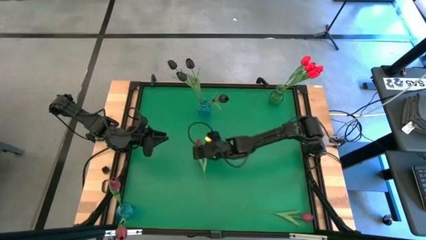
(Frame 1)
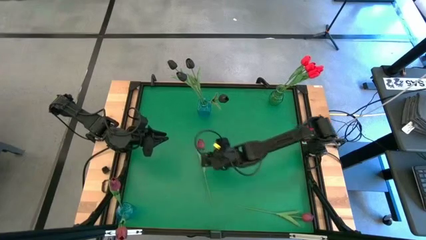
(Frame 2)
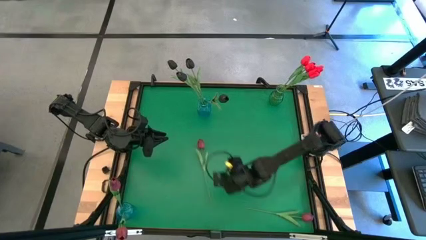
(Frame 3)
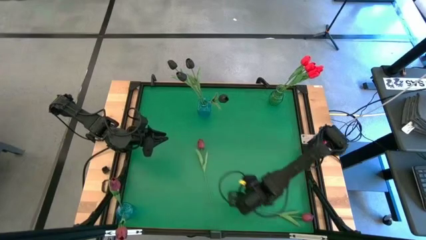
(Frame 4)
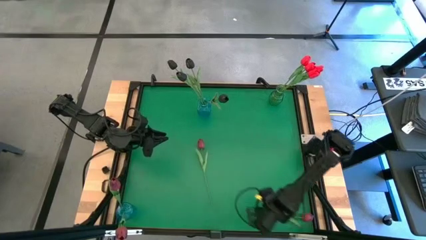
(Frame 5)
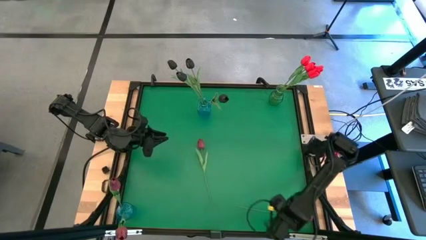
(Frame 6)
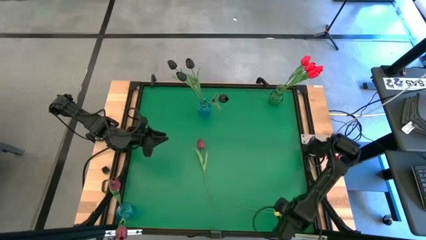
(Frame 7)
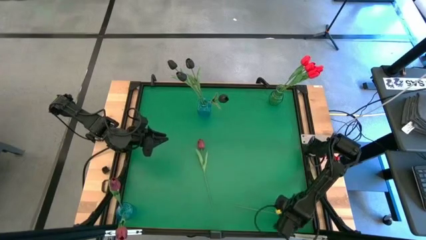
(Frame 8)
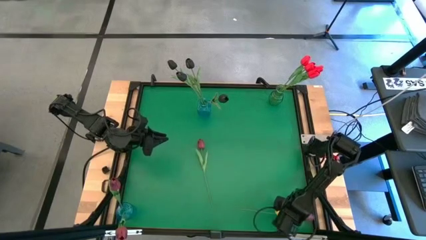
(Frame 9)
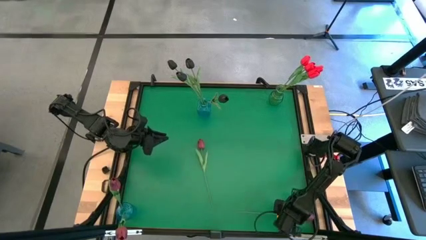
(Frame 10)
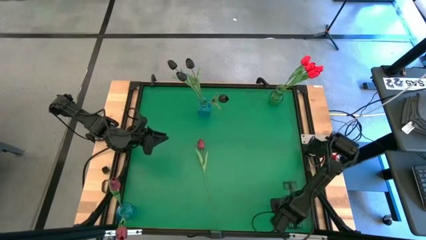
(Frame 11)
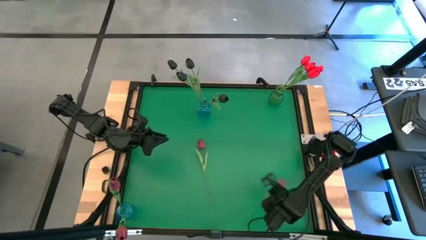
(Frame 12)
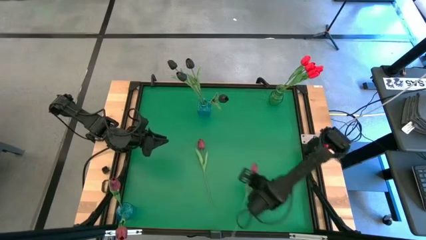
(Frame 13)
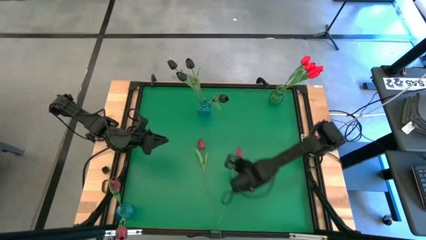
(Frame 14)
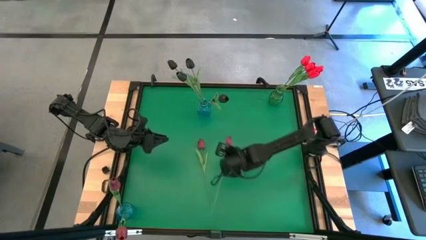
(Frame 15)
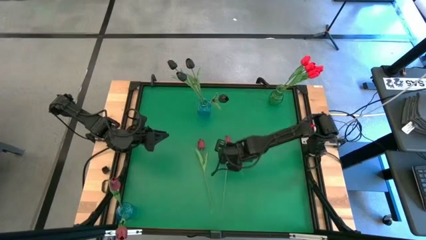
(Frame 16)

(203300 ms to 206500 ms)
Task: Sort flowers into vase by color
Adjust the pink tulip on the center table

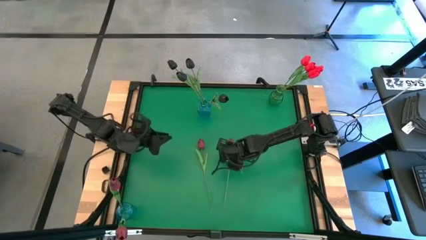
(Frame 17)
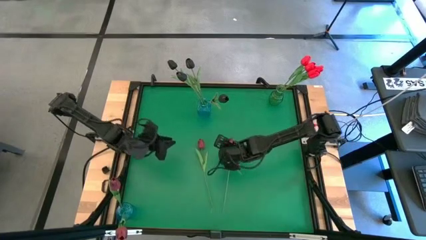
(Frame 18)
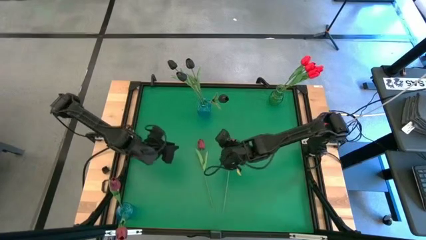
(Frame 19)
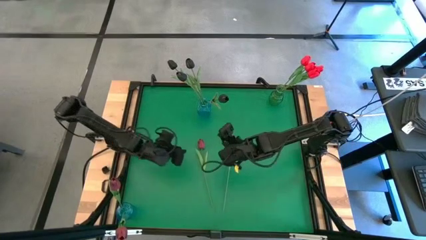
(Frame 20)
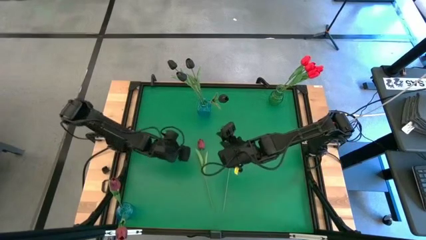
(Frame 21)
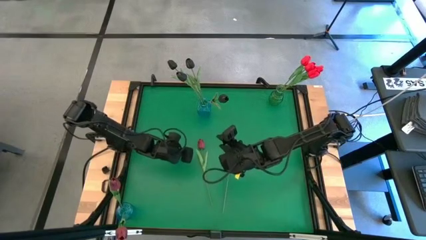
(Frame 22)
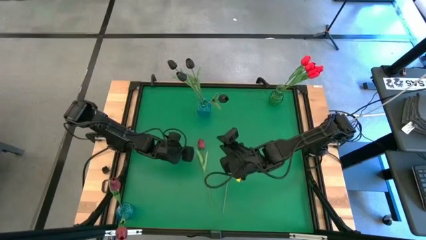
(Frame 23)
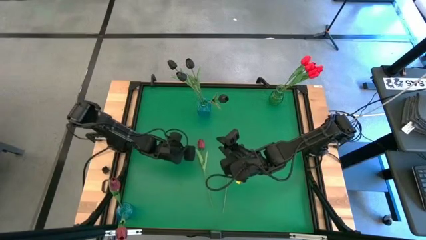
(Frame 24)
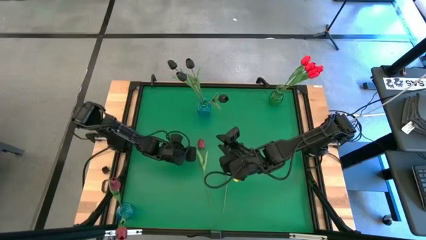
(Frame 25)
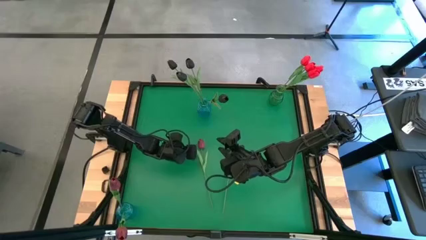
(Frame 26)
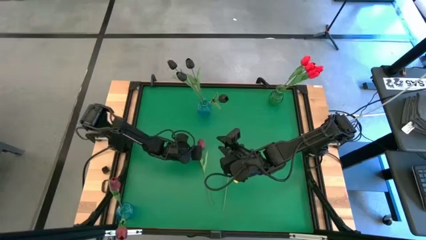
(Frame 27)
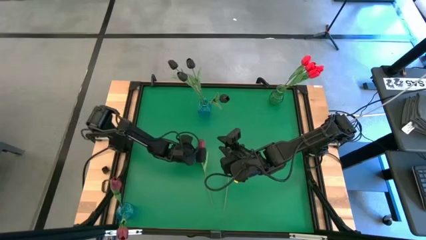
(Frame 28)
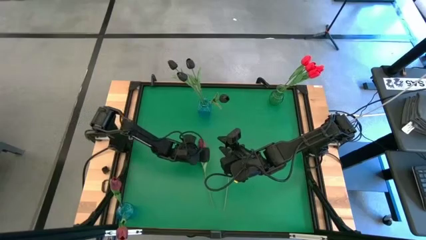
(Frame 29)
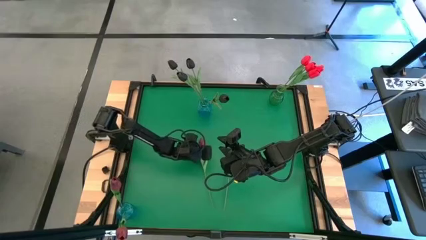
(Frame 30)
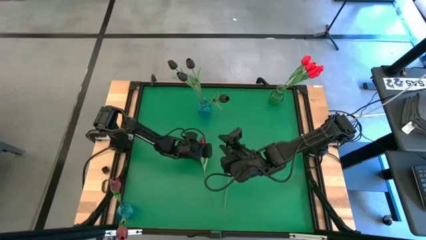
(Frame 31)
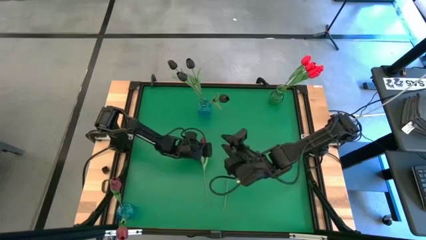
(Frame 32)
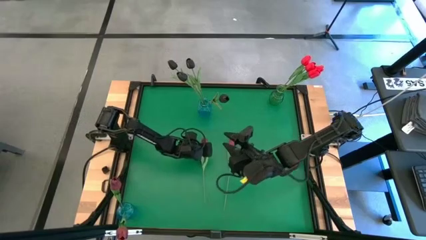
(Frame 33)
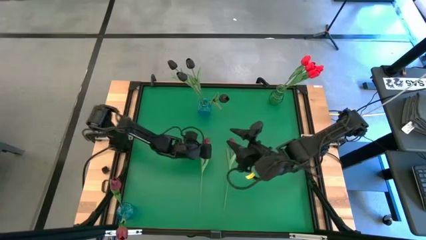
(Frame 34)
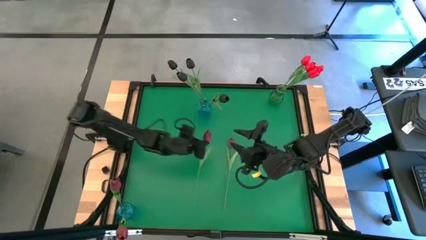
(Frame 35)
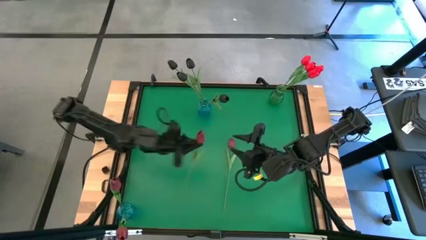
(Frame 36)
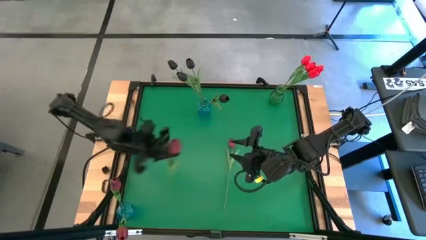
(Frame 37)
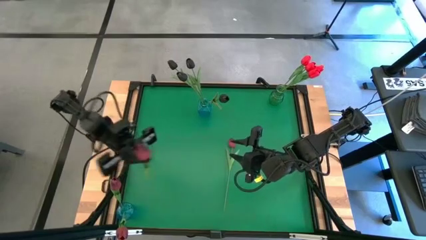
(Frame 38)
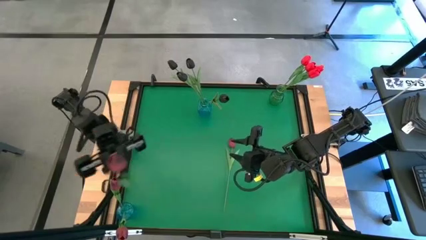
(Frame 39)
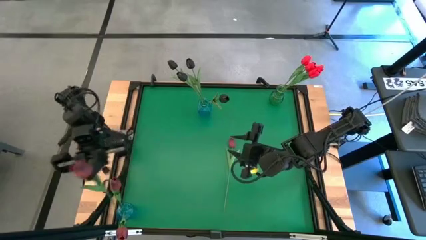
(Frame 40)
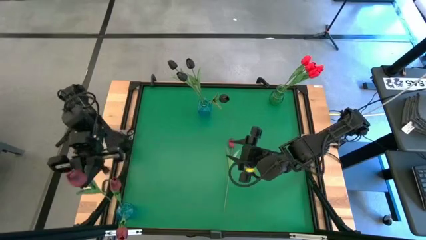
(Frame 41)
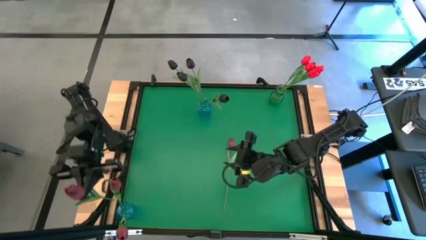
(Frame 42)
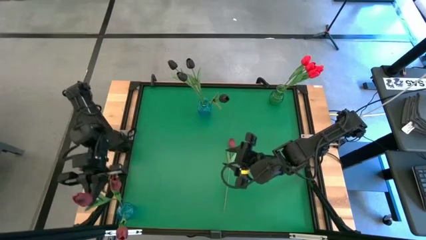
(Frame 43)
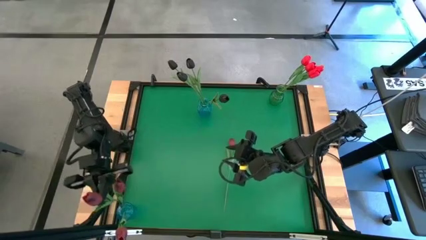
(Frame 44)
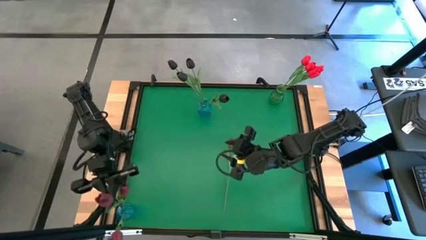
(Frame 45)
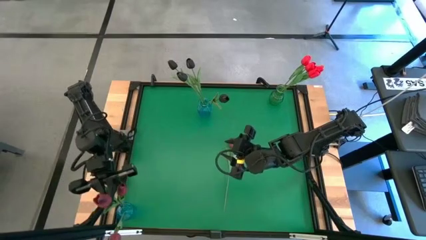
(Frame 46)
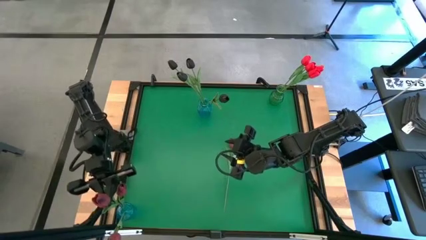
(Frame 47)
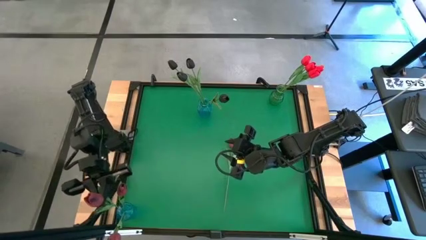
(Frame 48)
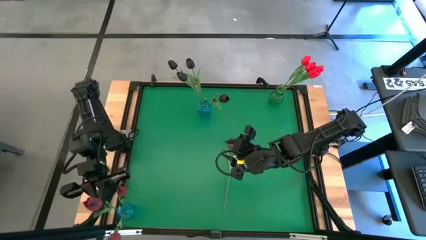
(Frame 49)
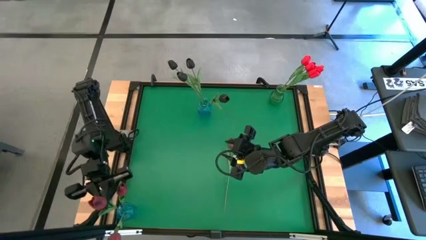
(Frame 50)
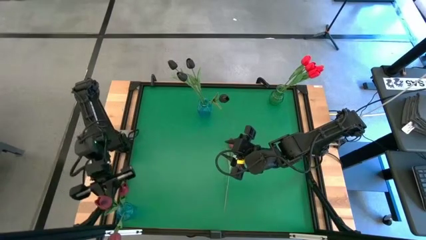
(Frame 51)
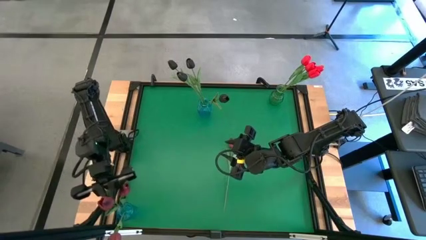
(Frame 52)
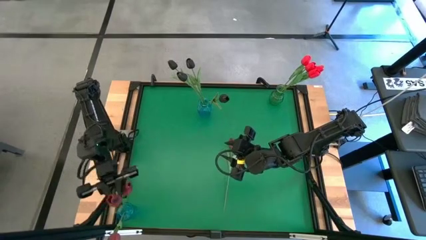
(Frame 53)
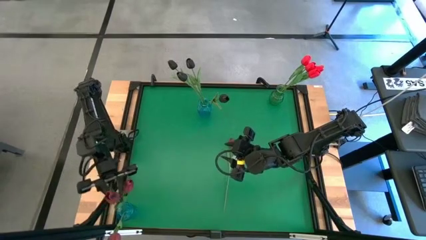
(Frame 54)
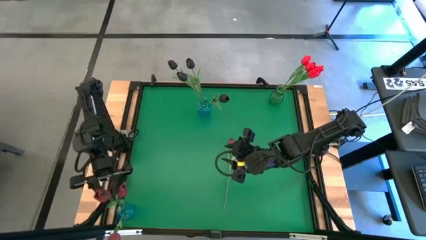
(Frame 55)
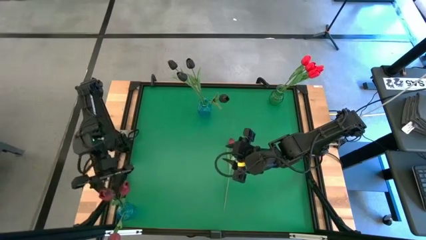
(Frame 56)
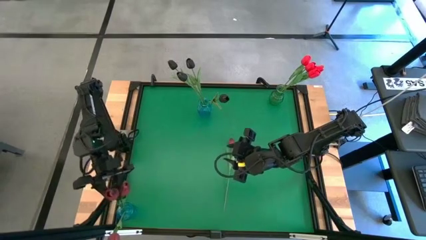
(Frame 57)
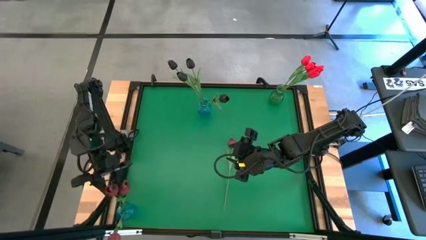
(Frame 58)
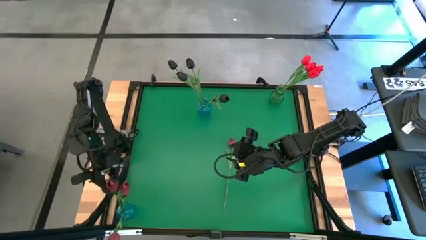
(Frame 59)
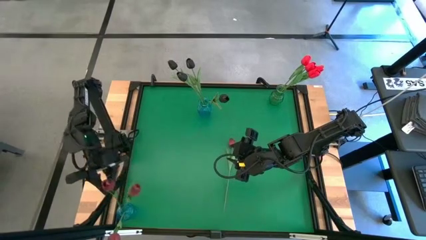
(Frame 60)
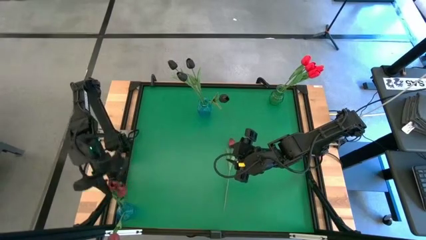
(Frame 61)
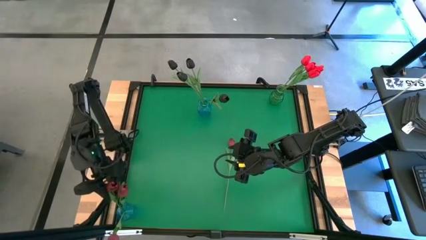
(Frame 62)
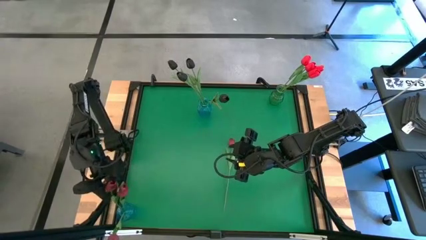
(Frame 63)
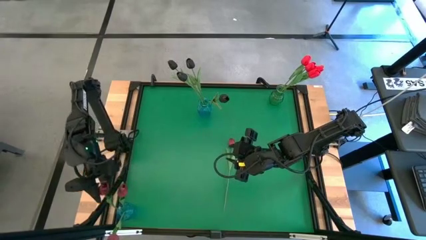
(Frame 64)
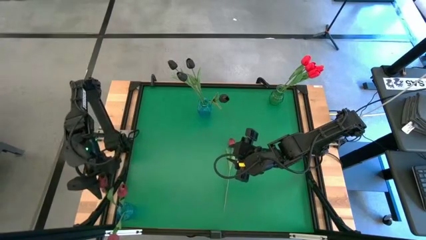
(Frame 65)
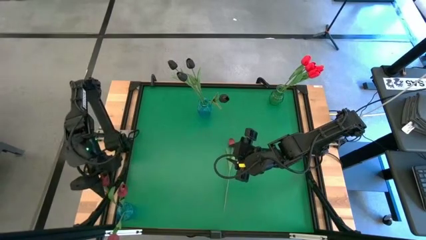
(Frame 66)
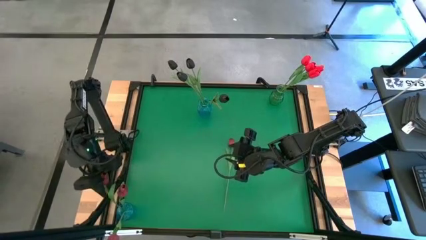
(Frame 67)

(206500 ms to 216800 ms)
Put the pink tulip into the bottom blue vase

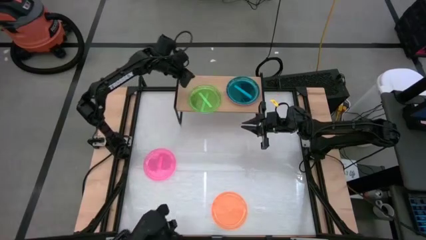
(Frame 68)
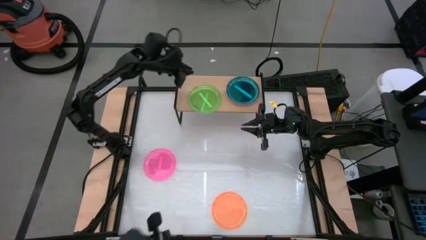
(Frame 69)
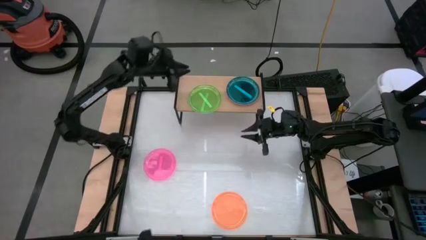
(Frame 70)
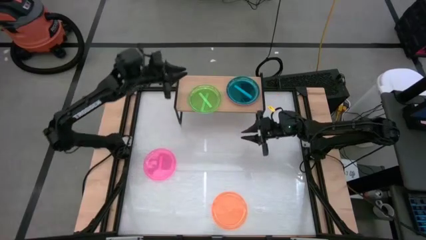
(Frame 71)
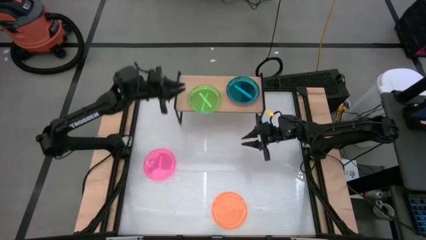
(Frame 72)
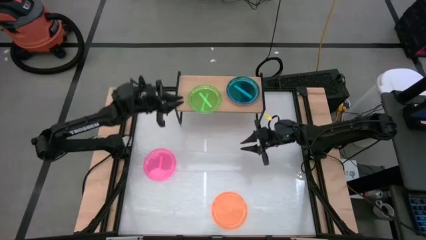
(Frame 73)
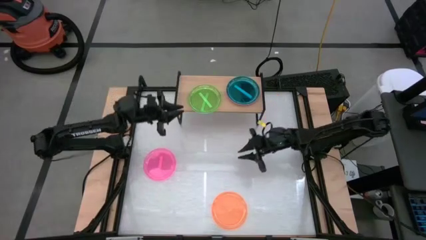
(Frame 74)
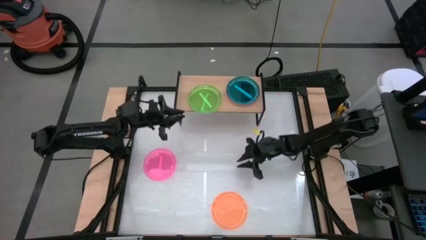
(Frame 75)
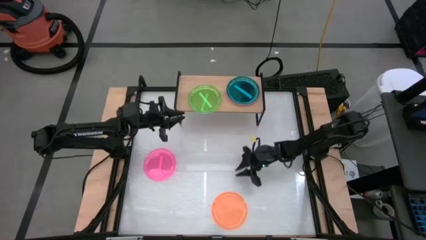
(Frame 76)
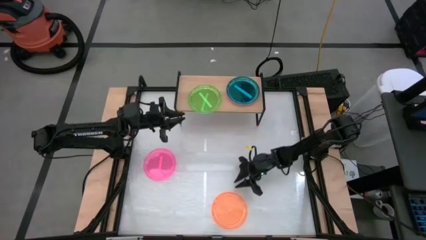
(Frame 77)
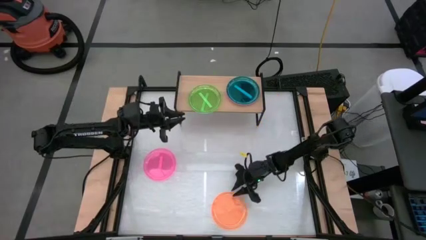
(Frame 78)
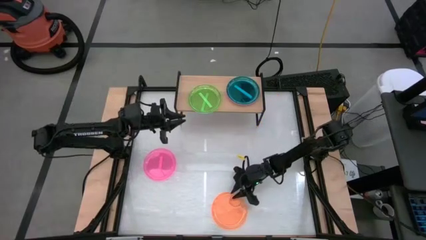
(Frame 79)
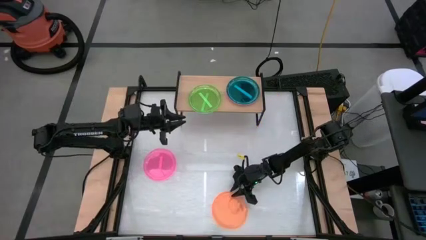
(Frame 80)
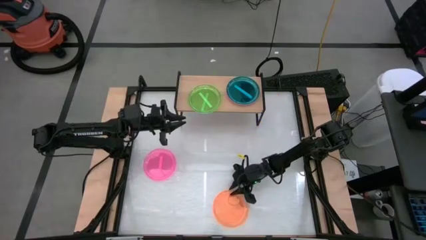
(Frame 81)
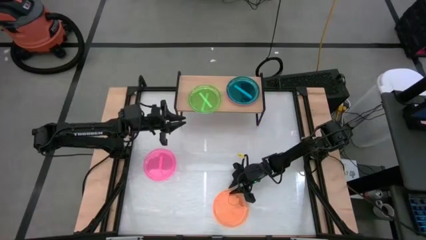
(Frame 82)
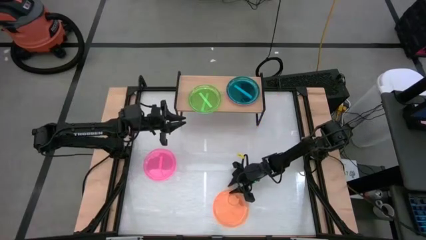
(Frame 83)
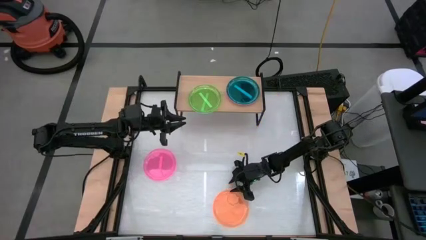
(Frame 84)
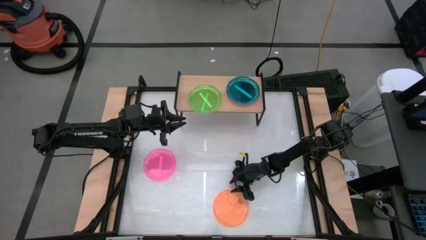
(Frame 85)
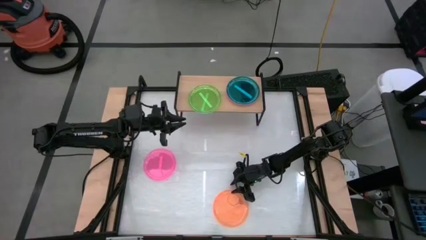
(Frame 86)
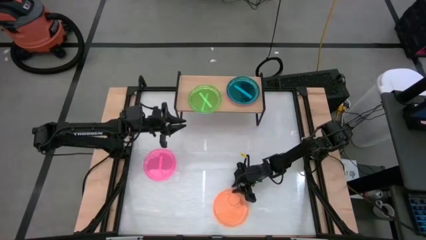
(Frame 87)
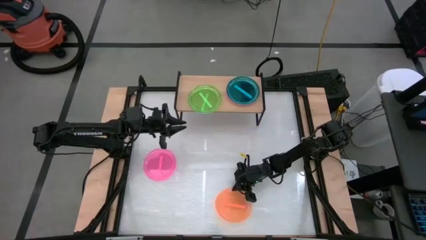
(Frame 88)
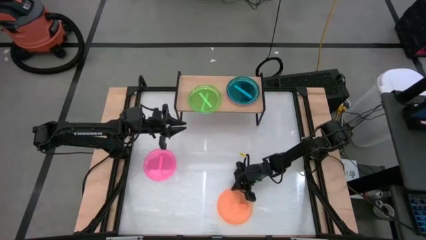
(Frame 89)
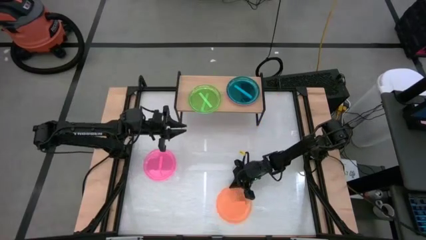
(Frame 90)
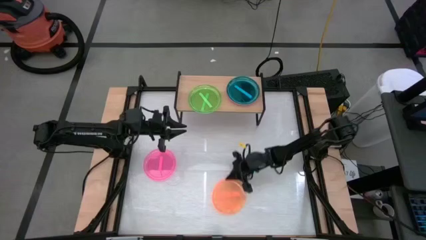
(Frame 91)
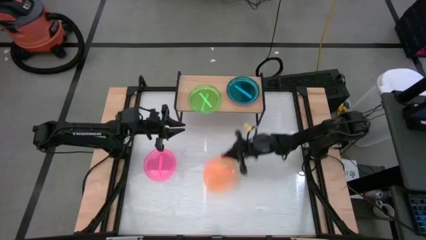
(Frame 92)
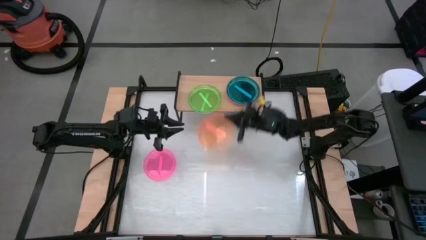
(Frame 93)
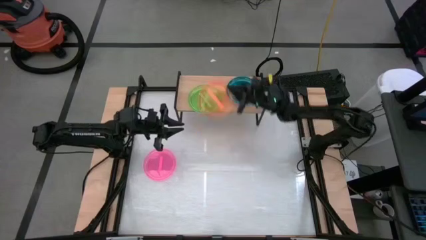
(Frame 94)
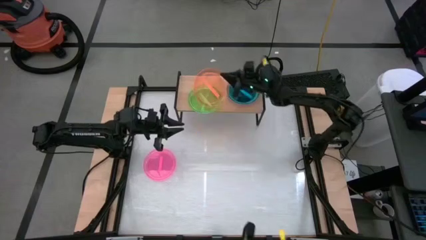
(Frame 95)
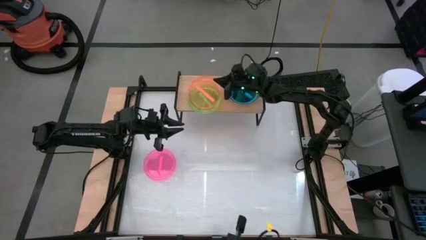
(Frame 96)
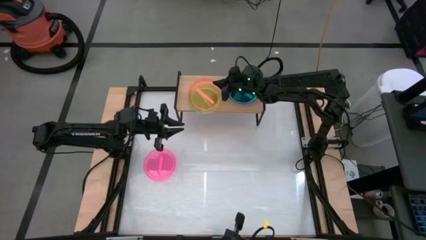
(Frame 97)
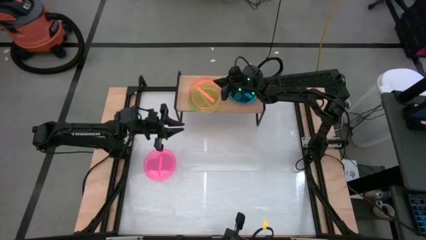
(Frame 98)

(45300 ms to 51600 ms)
Task: Place and stack plates onto a shelf
Stack the orange plate on top of the green plate on the shelf
